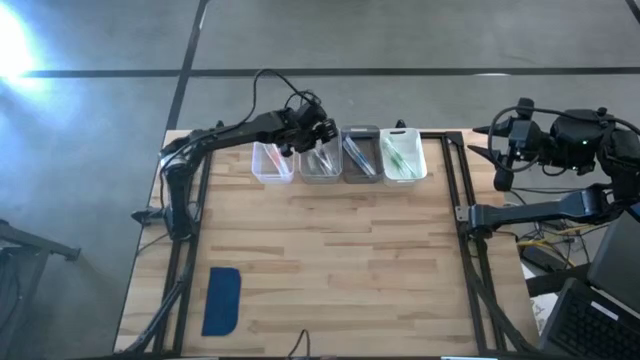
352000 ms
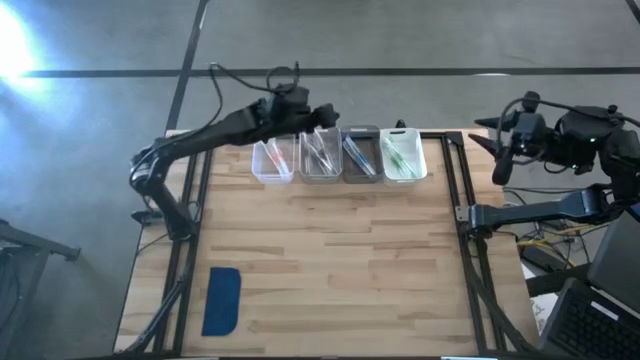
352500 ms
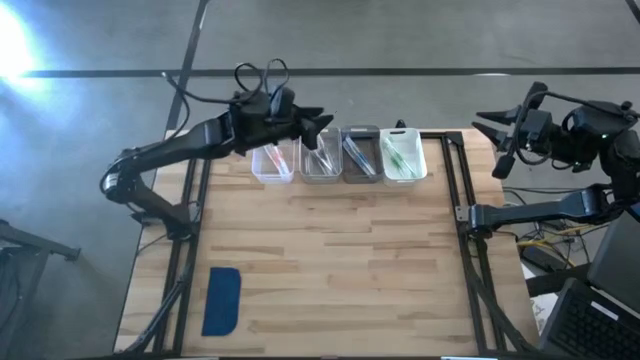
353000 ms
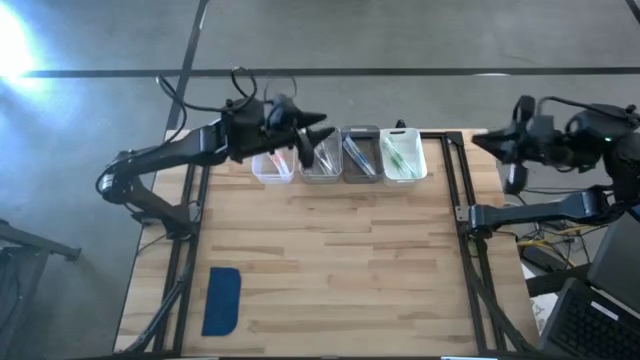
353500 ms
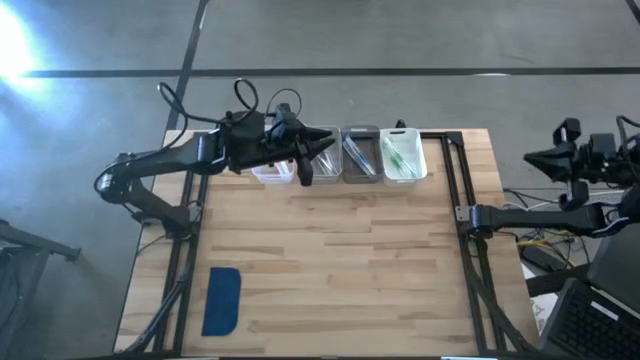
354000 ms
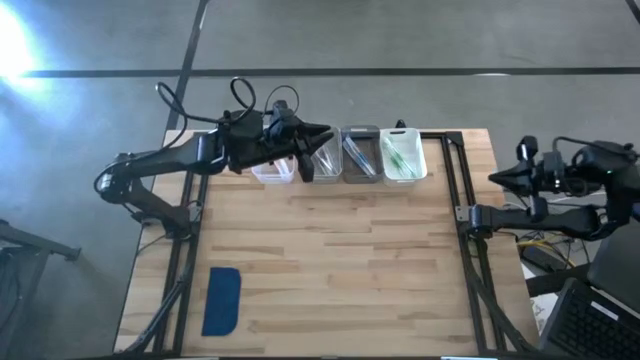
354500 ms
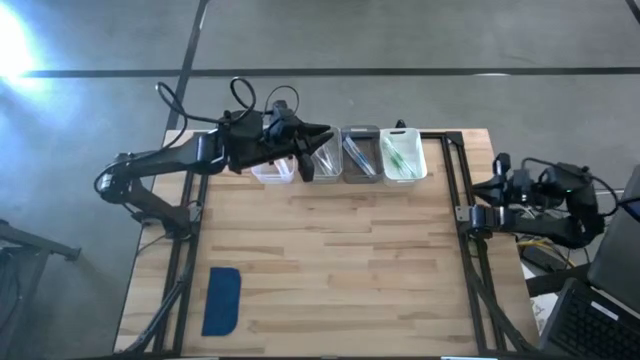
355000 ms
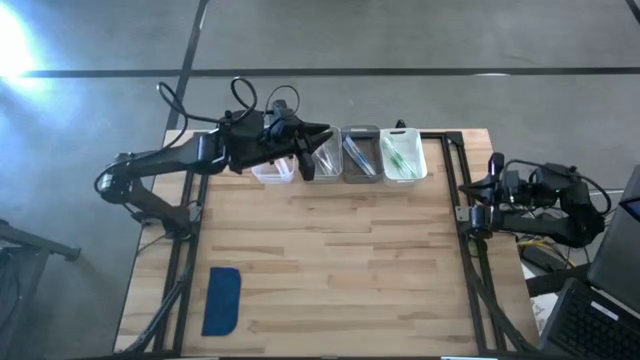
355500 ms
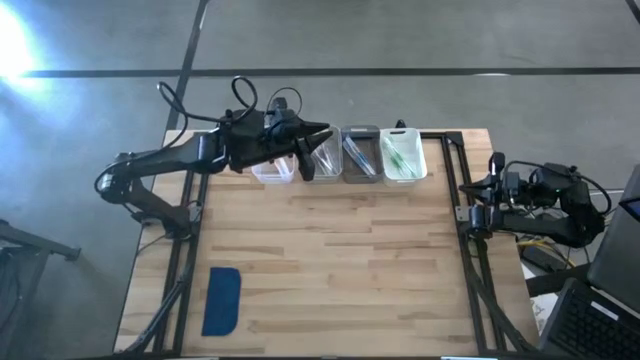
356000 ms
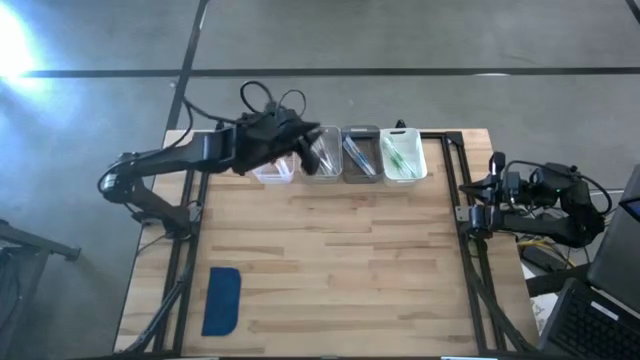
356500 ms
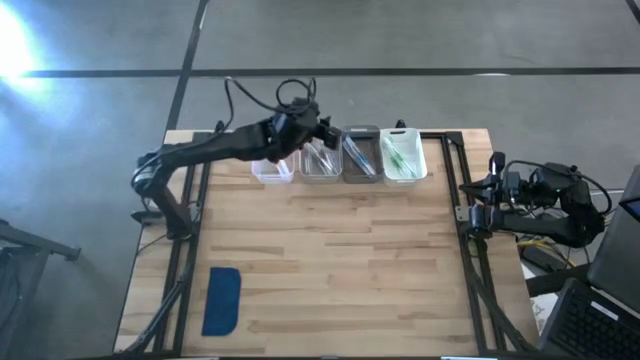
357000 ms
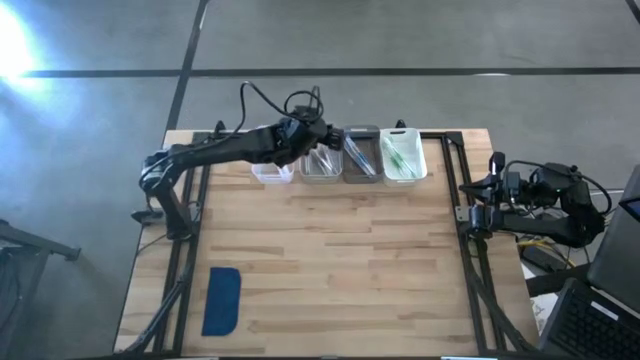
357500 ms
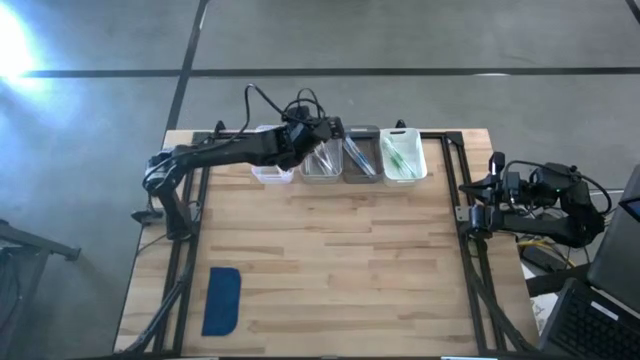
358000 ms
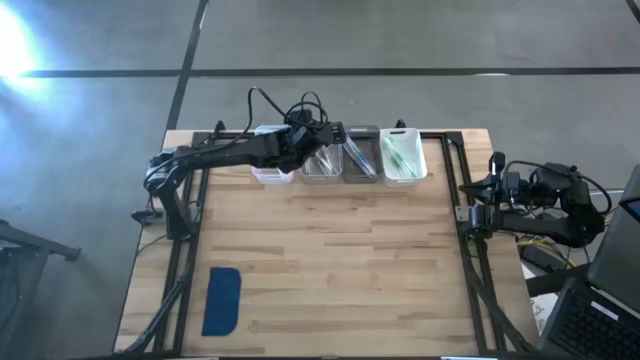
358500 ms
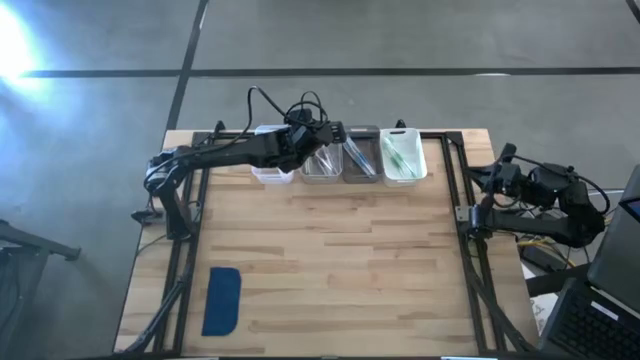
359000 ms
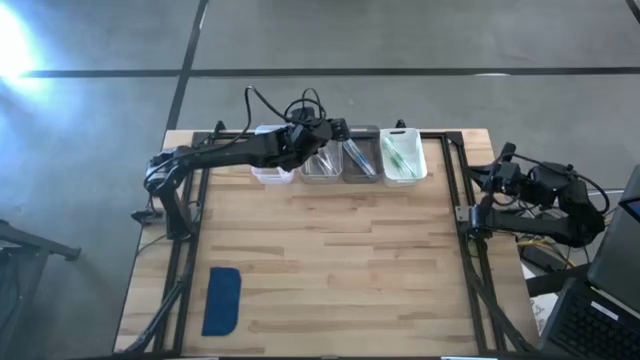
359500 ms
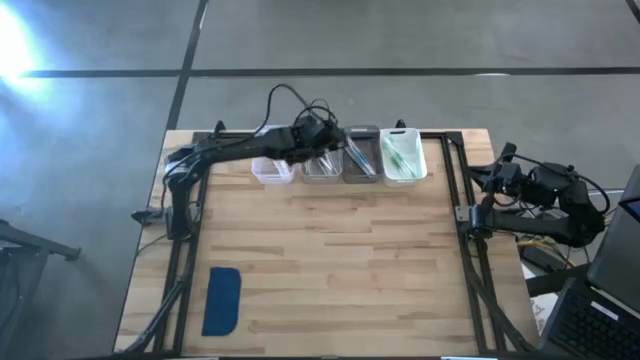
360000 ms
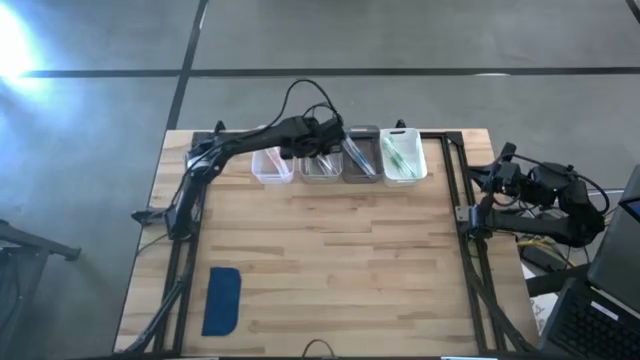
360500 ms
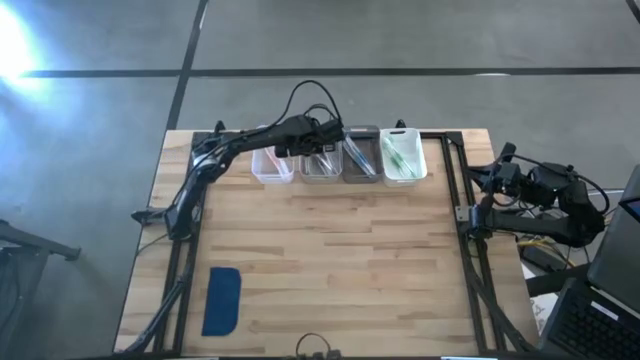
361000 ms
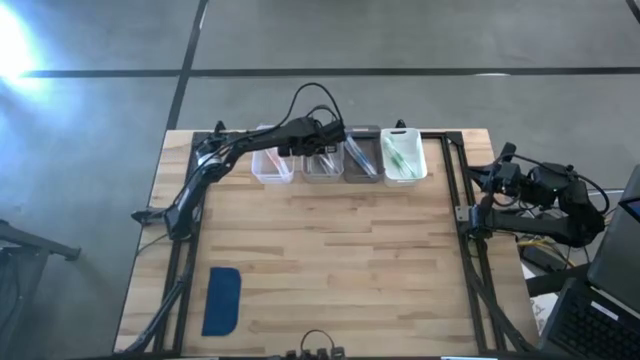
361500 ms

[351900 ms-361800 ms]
Task: Pick & Place Toothbrushes
Adjust the gray bin

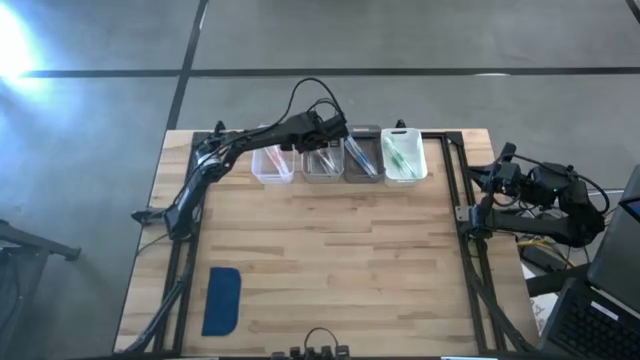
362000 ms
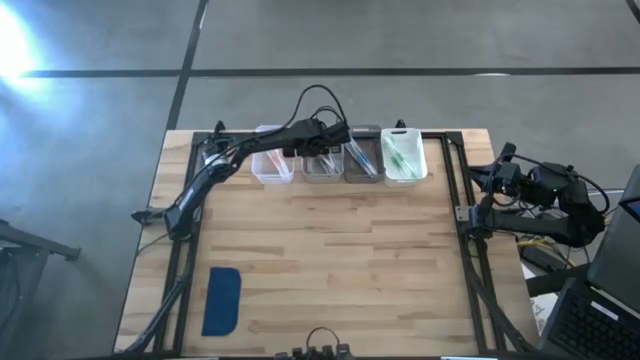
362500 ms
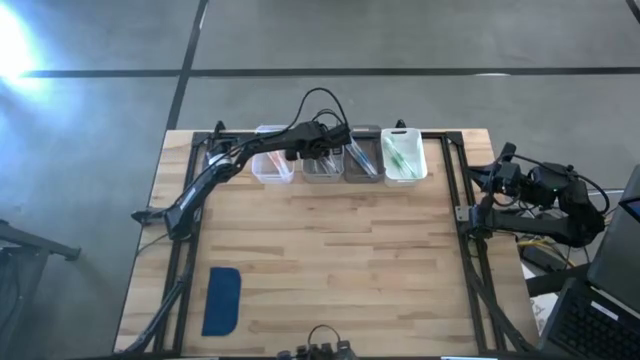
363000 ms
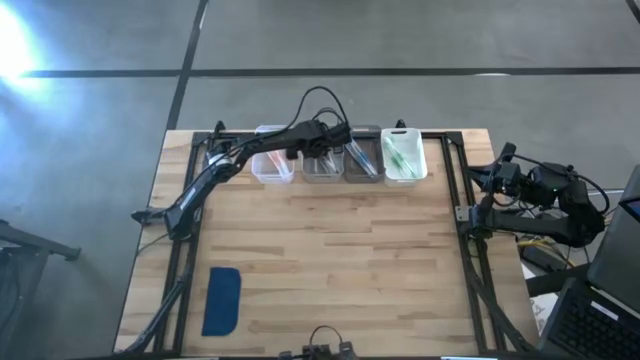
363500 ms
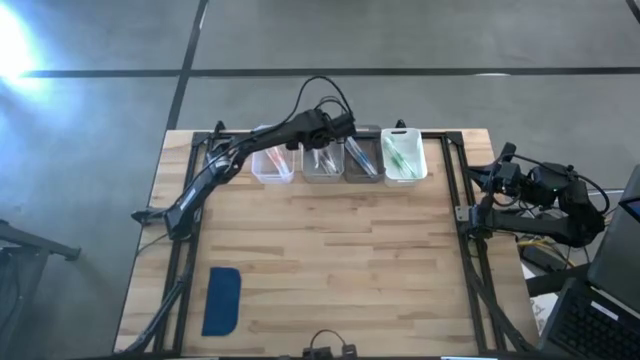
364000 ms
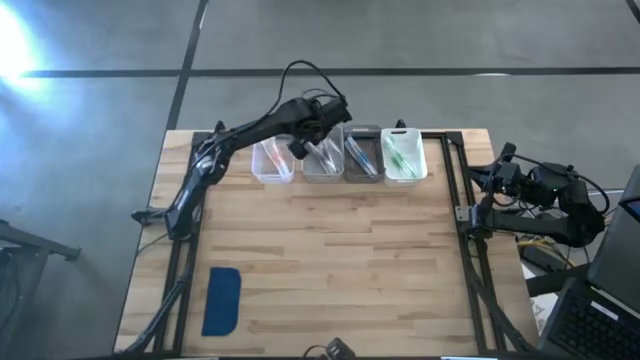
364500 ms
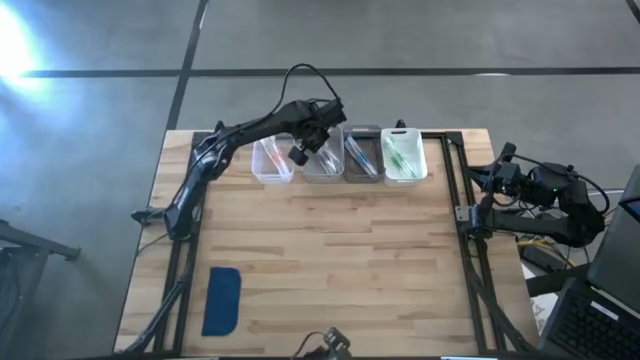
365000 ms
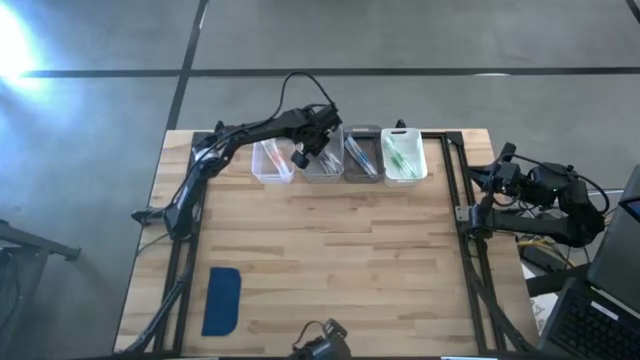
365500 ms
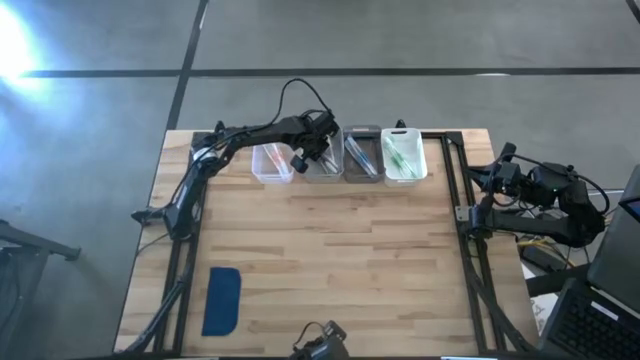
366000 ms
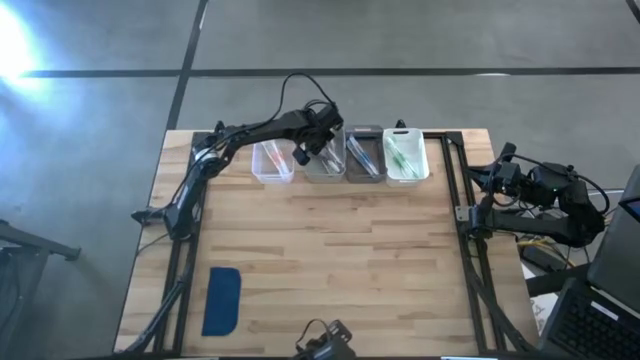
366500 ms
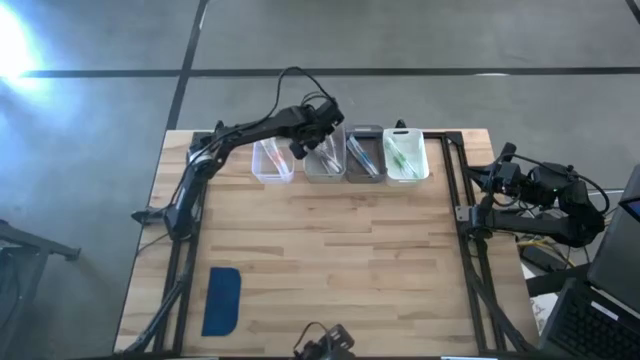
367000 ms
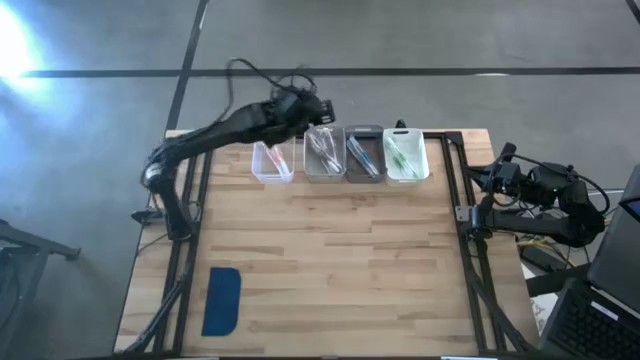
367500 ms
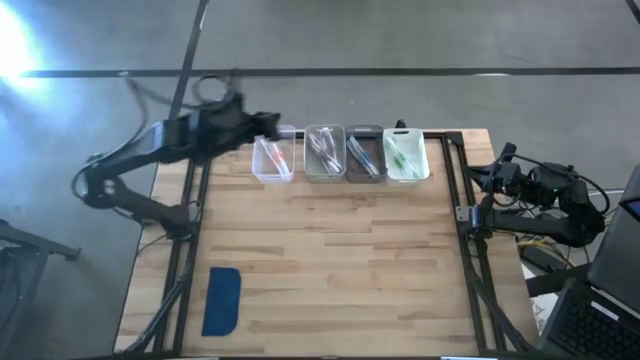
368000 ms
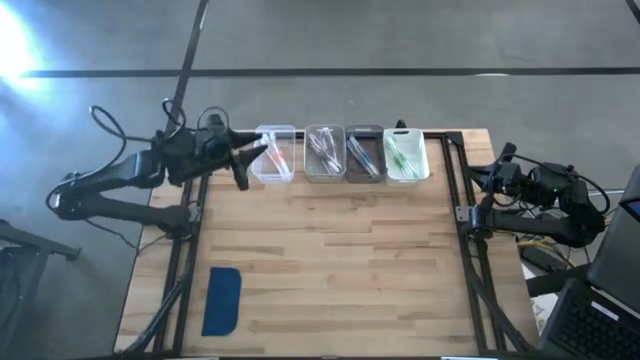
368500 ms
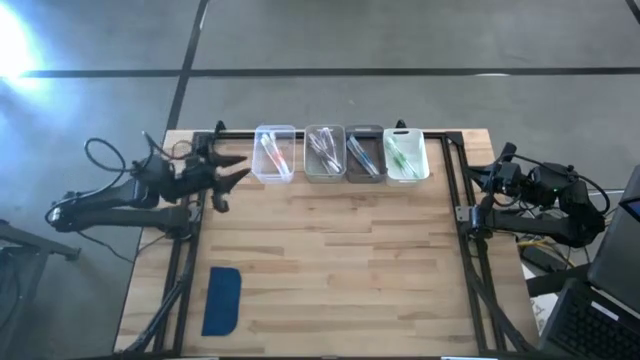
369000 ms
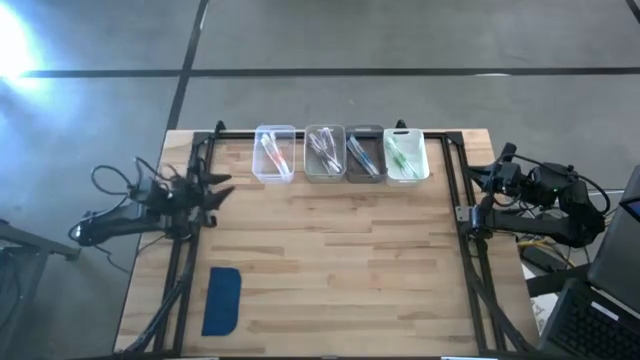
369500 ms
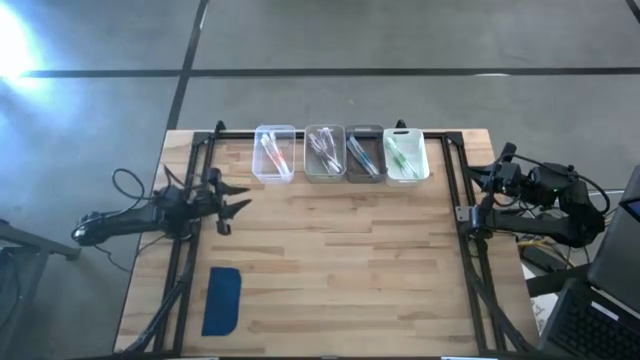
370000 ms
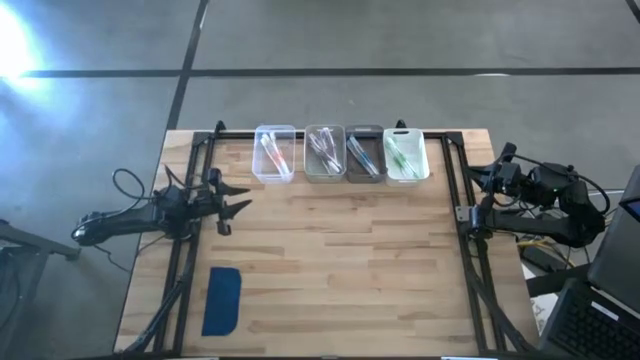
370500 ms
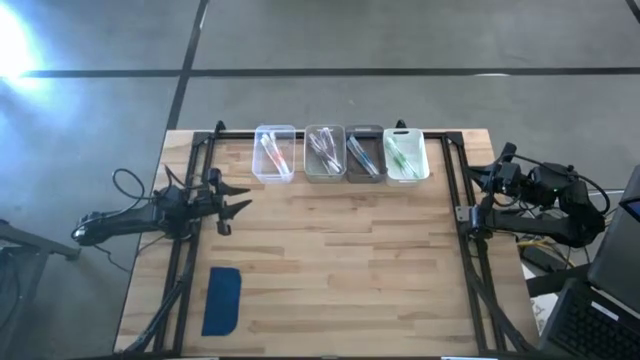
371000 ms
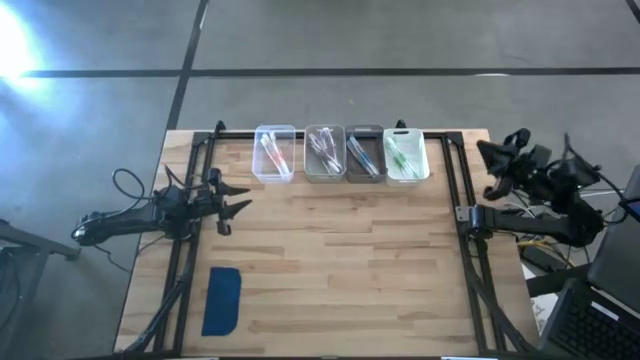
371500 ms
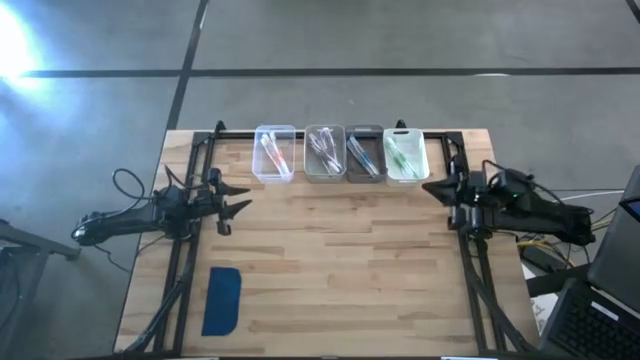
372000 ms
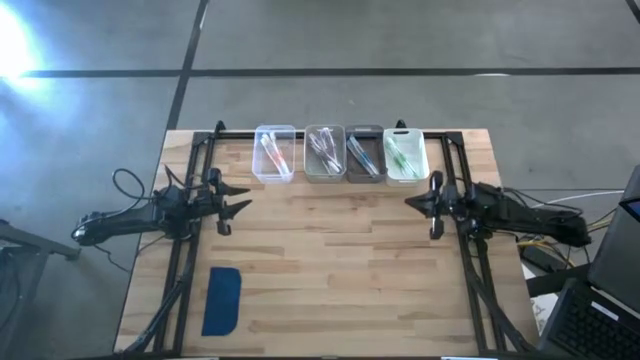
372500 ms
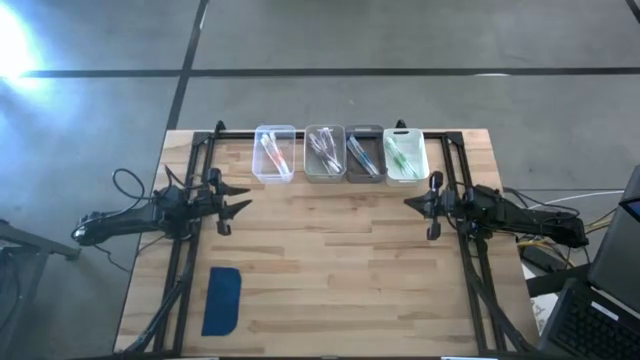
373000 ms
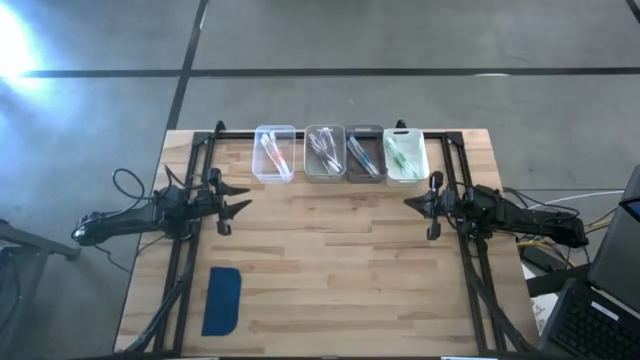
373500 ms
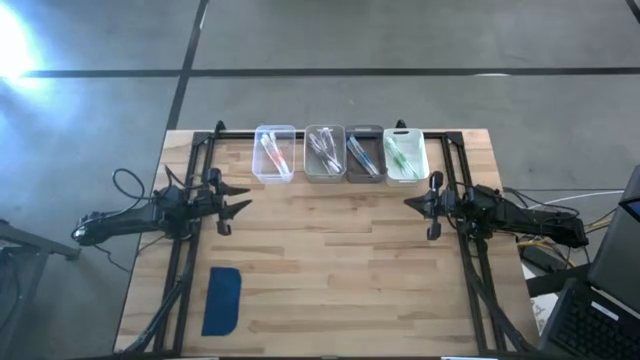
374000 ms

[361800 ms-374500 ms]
Return to Home Position
